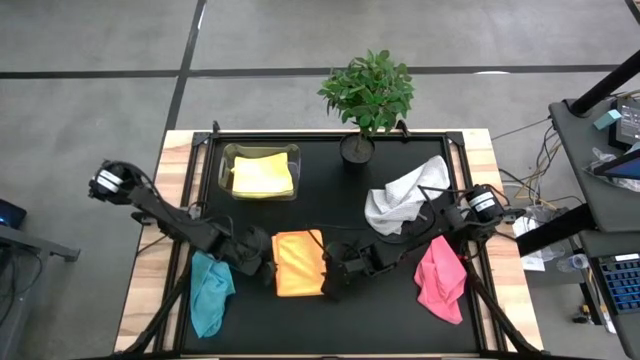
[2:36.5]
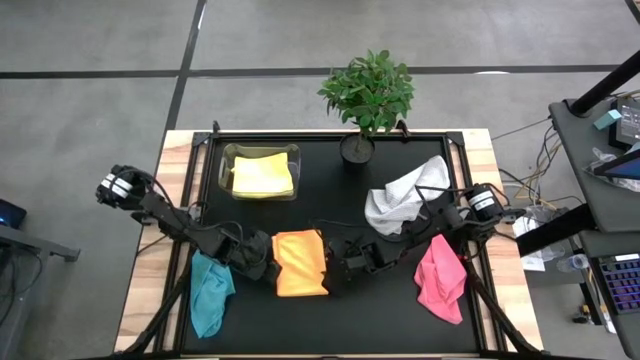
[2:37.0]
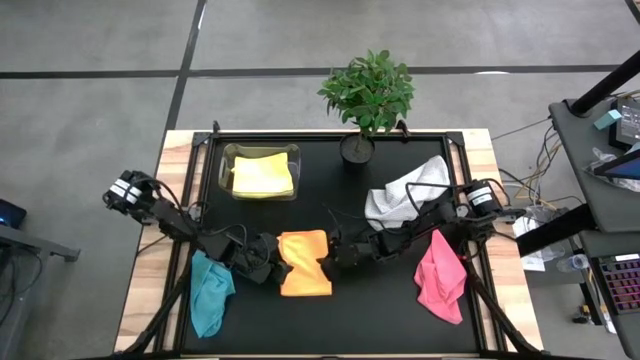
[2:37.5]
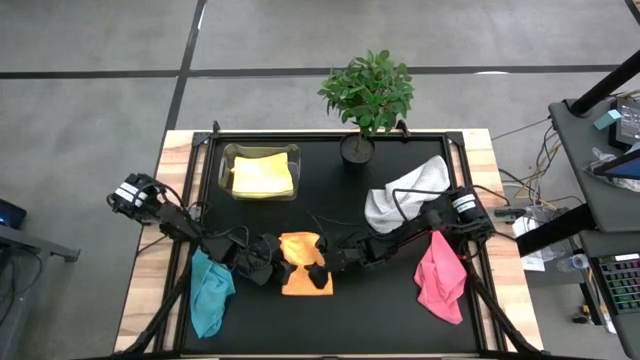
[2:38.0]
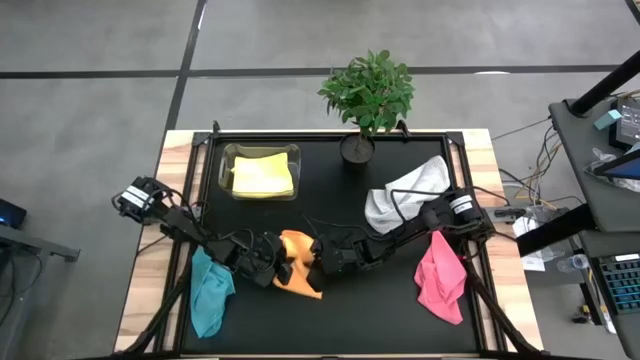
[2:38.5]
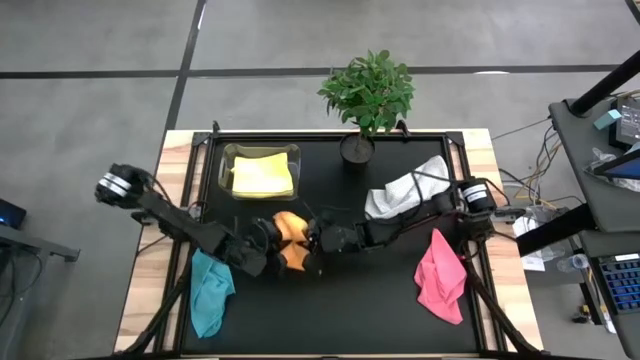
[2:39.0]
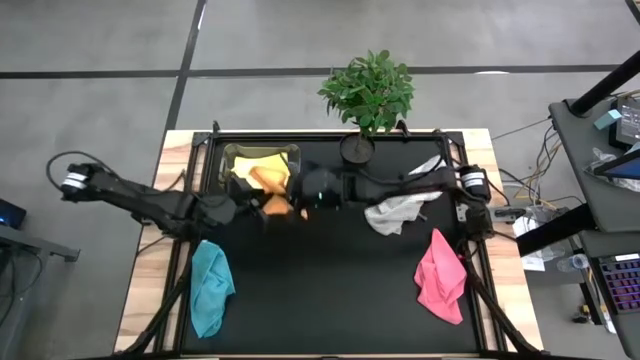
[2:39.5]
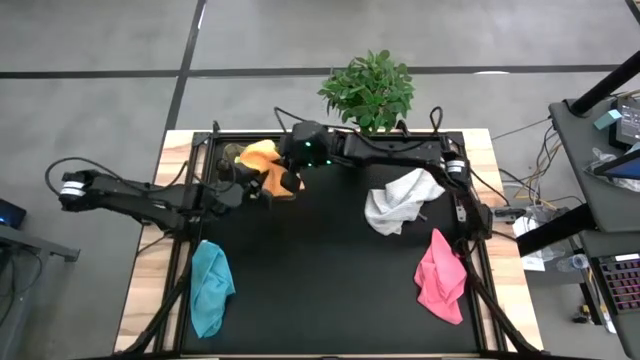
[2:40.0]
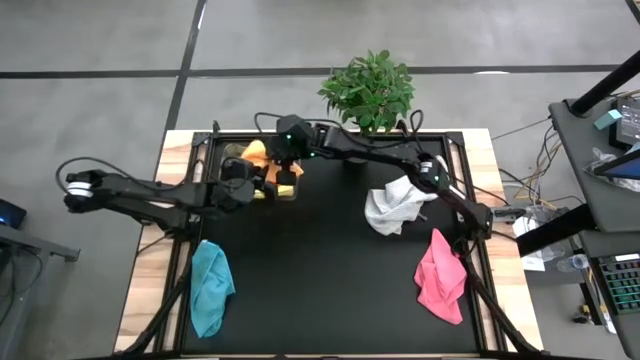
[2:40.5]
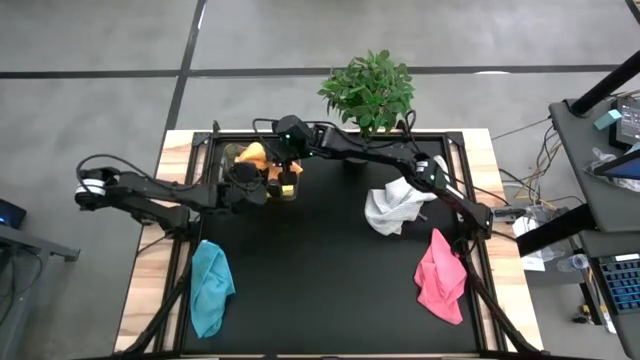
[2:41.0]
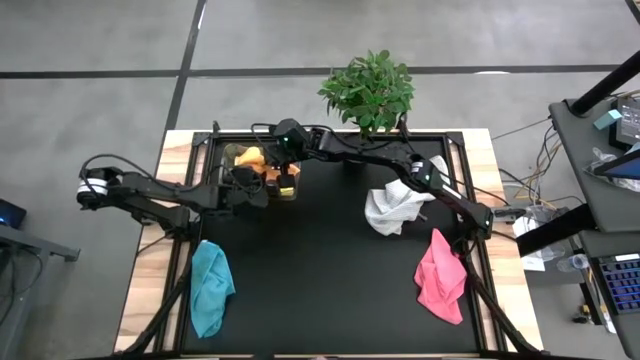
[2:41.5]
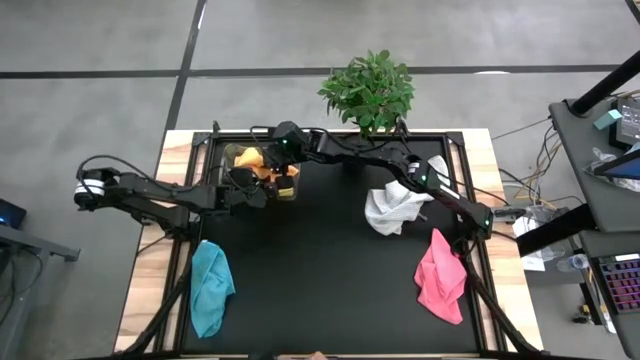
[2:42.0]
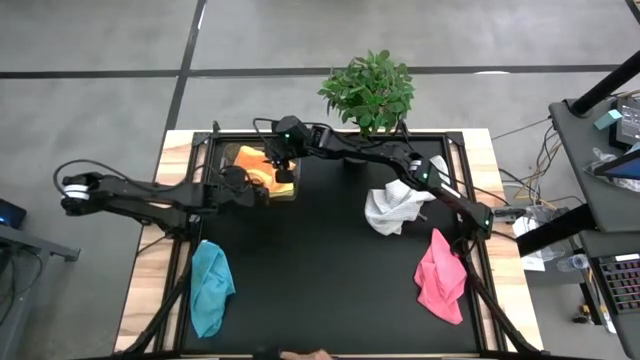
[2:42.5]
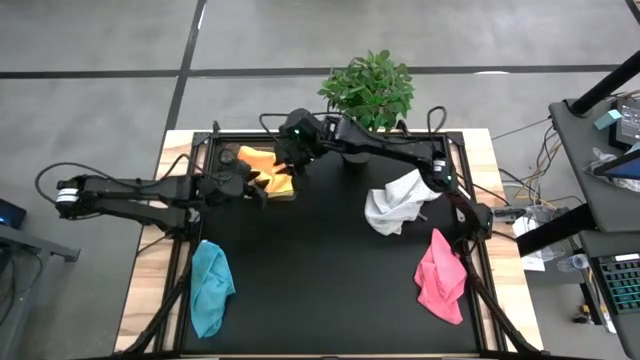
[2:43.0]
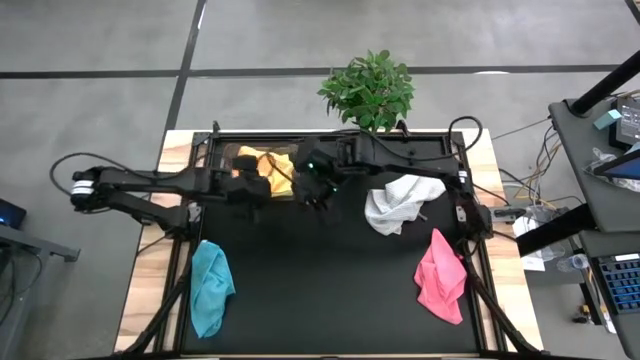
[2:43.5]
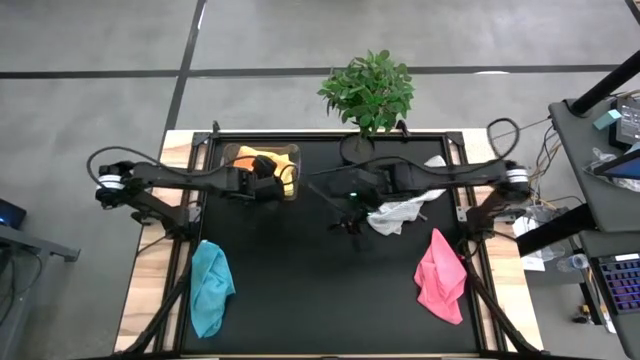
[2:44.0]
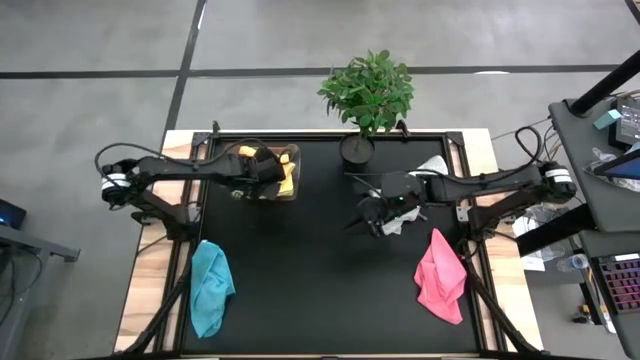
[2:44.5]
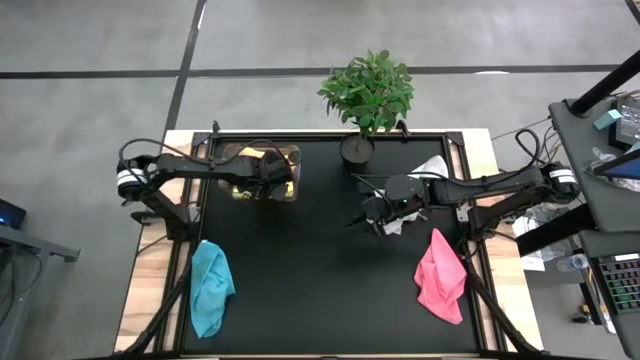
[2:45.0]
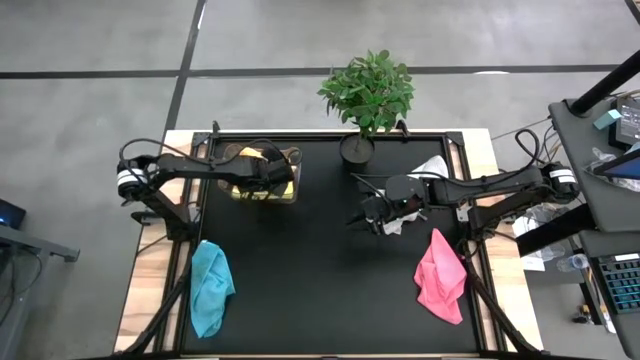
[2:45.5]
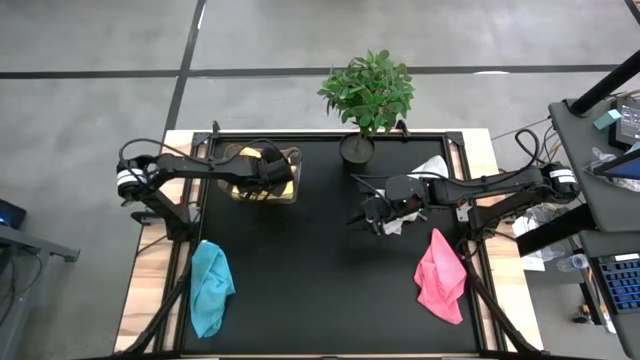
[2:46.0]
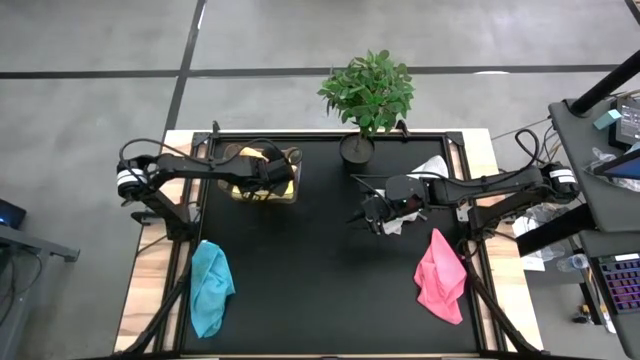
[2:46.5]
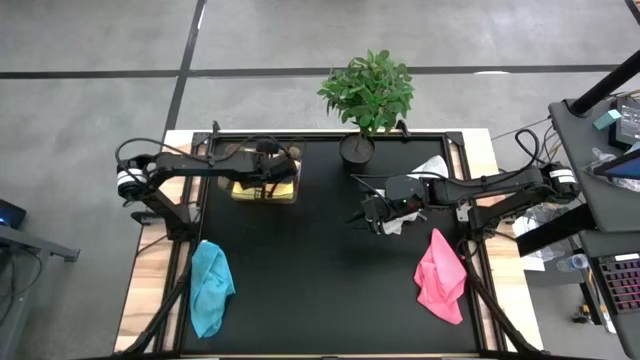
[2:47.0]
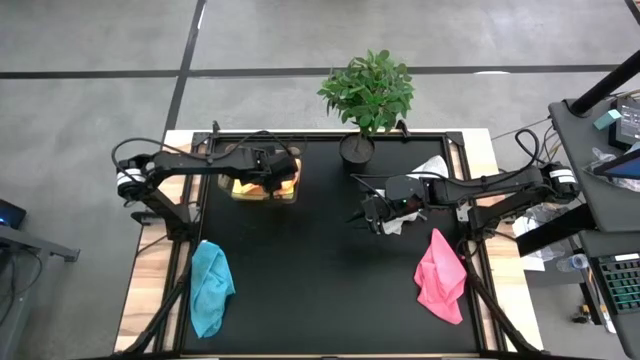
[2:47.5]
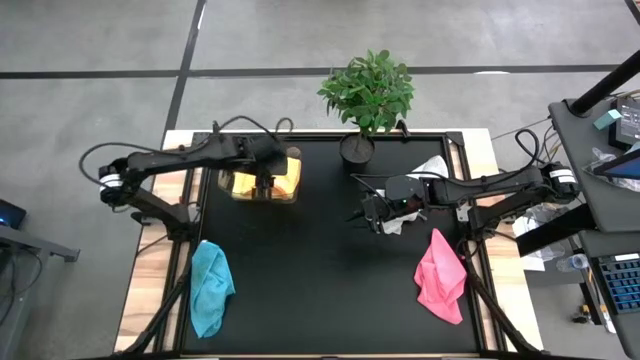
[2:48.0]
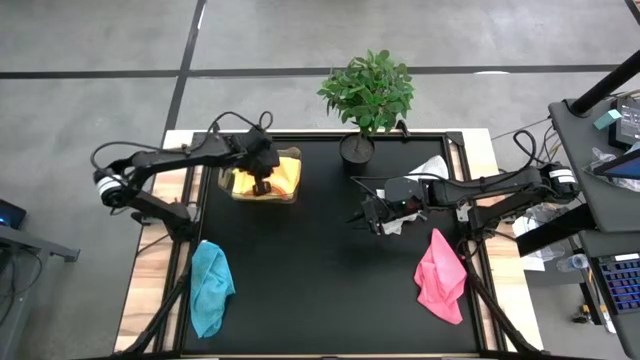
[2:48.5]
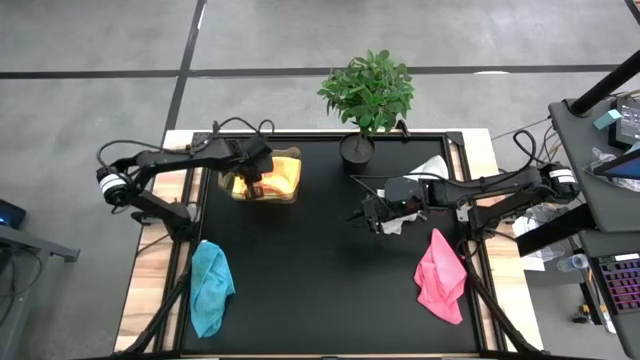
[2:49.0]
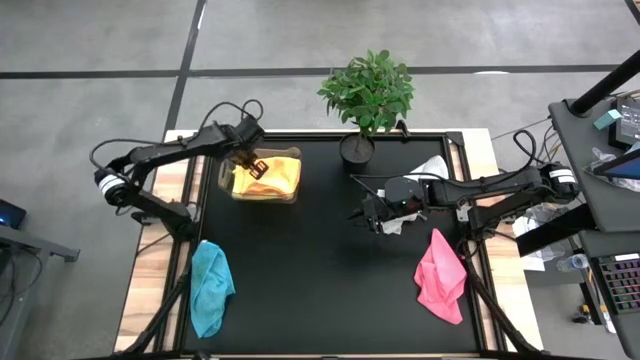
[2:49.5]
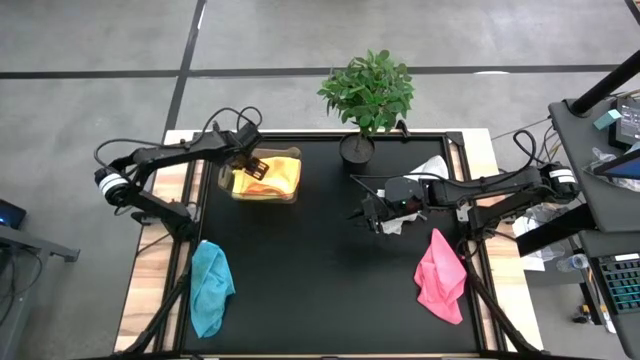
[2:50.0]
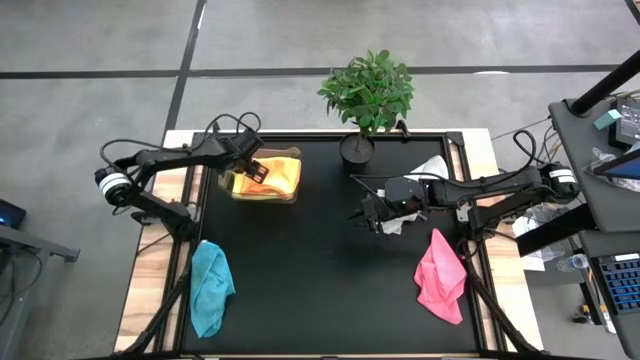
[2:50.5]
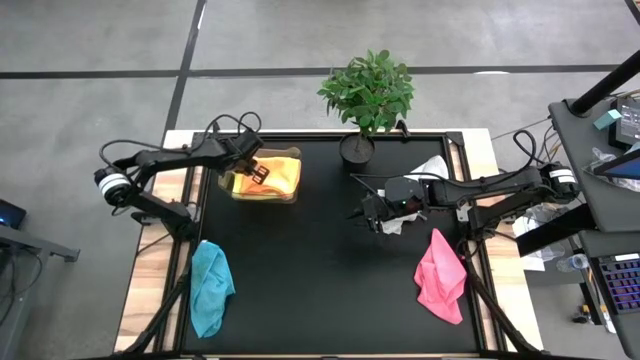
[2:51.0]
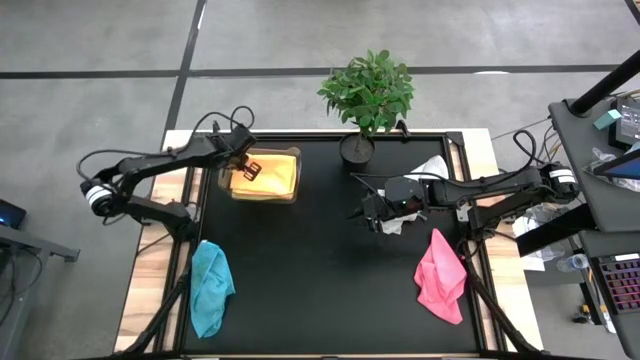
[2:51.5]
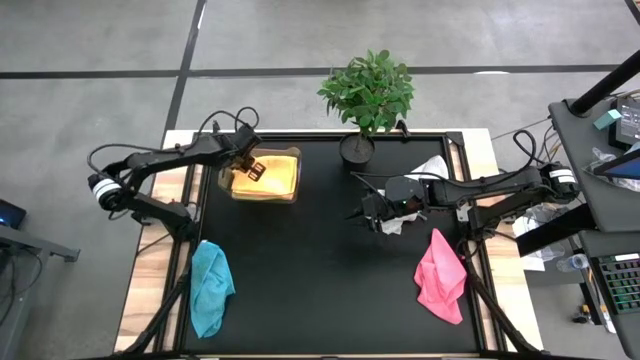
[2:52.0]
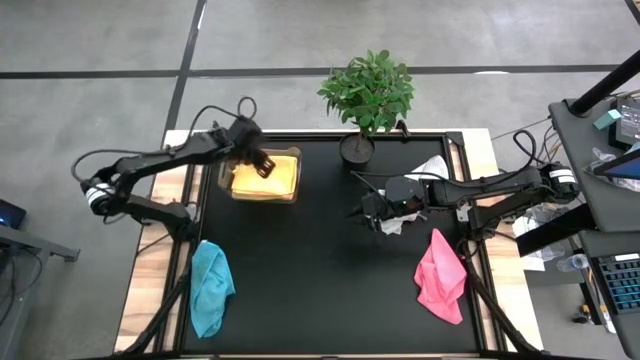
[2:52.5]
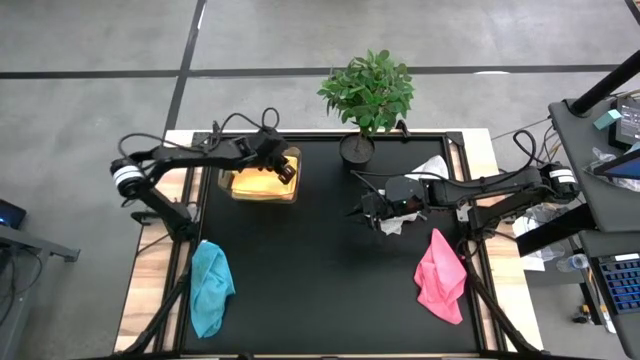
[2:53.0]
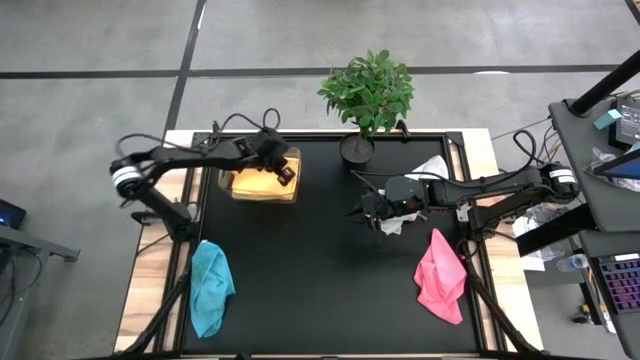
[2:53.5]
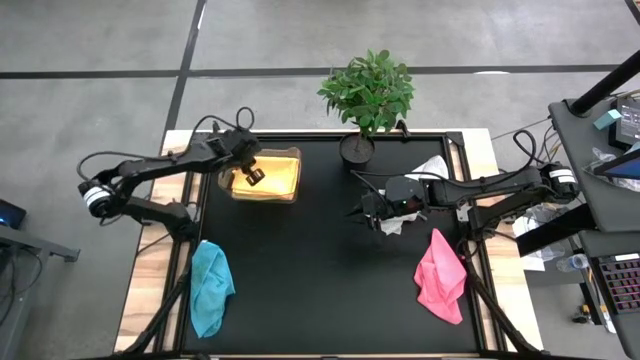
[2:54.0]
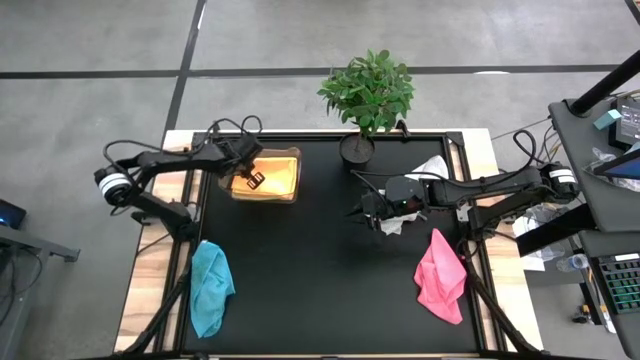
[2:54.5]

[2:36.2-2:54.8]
Task: Fold microfiber towels
Put the orange towel into the transparent bin

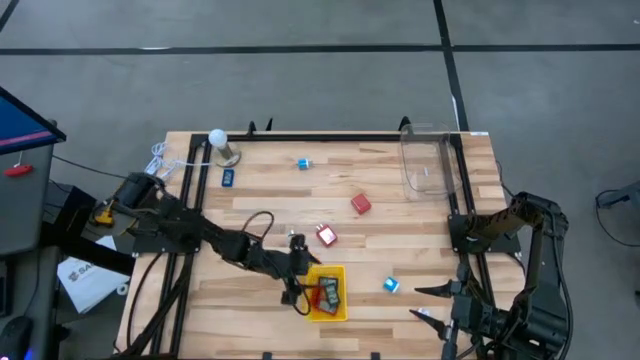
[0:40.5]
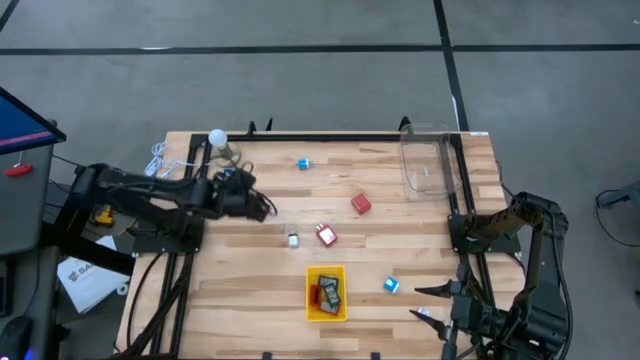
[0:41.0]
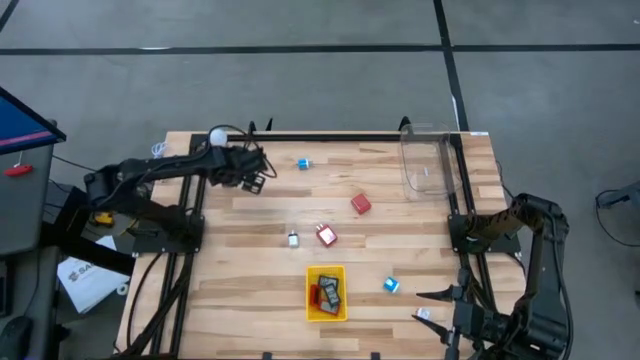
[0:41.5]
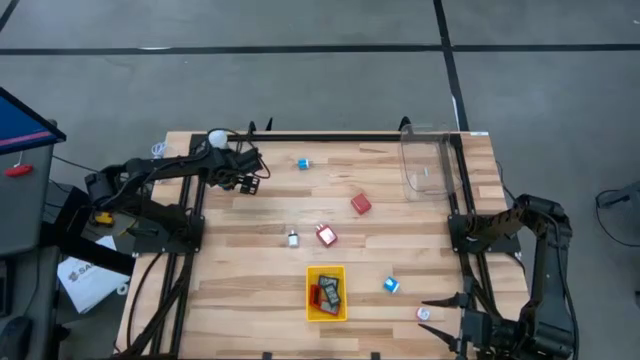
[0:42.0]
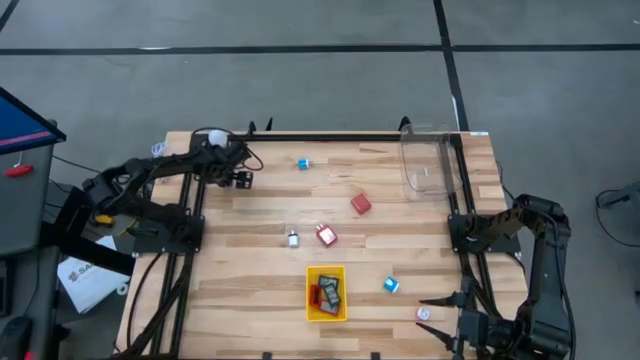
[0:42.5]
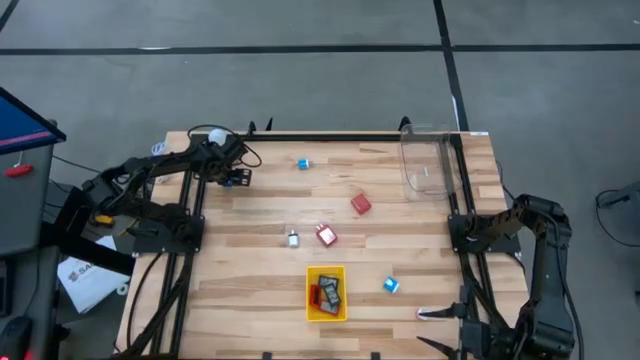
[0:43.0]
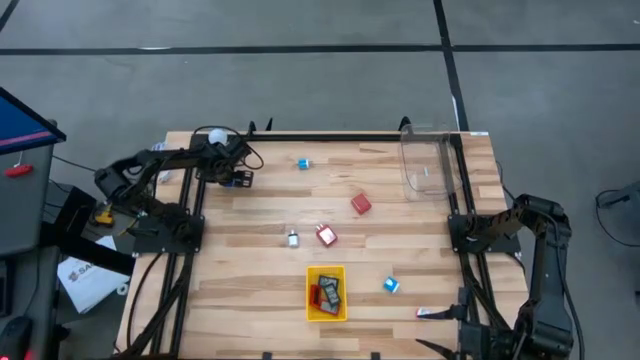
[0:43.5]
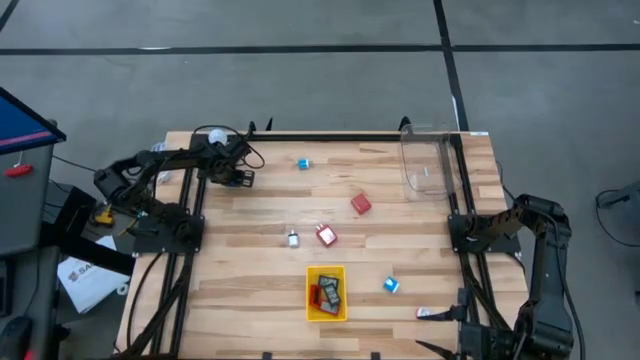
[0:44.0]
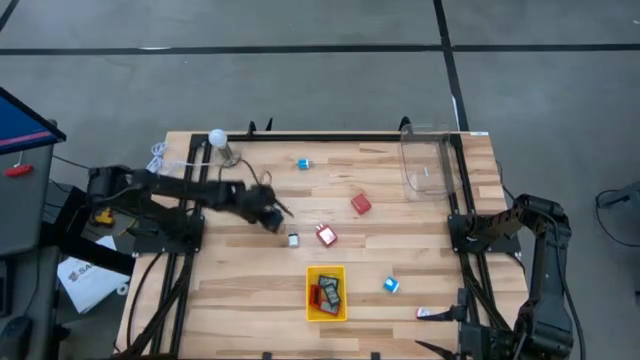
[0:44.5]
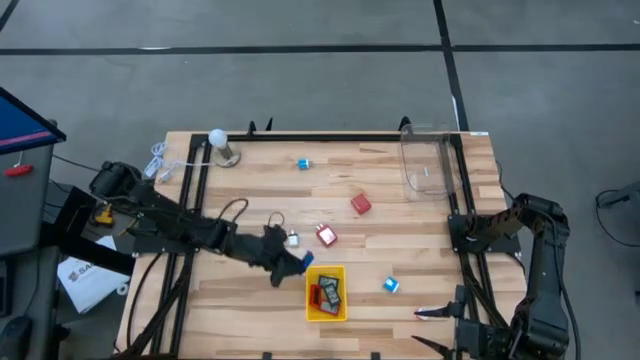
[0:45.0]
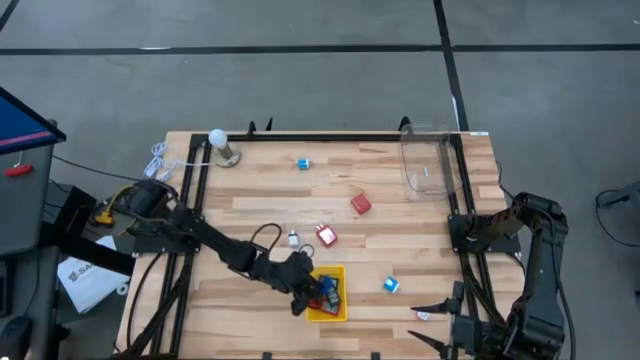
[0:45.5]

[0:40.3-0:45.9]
Task: Pick & Place Office items
Put the blue digital timer into the yellow bin
